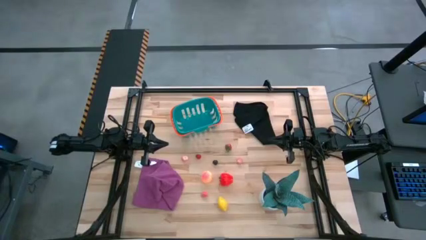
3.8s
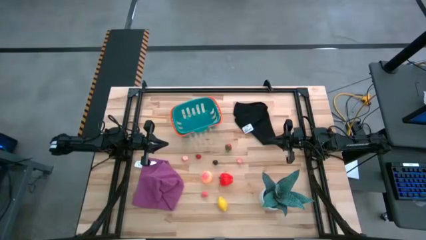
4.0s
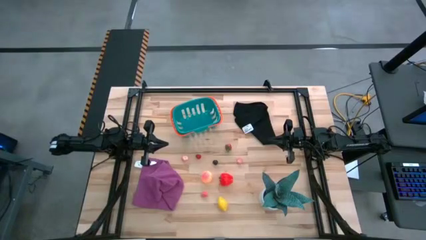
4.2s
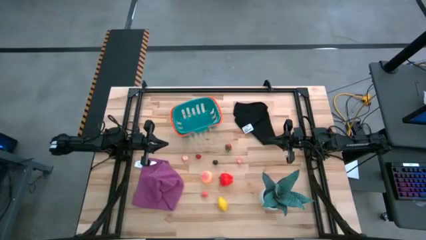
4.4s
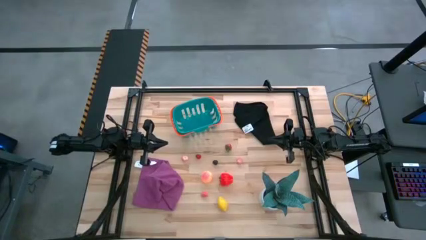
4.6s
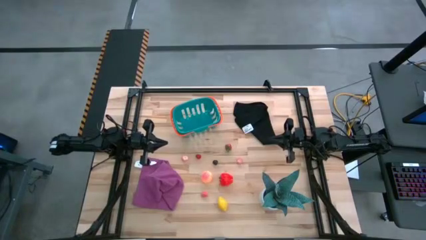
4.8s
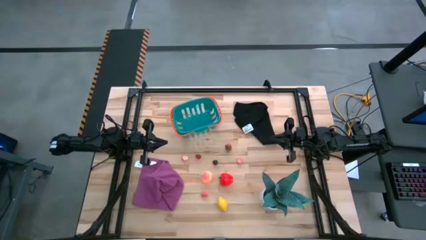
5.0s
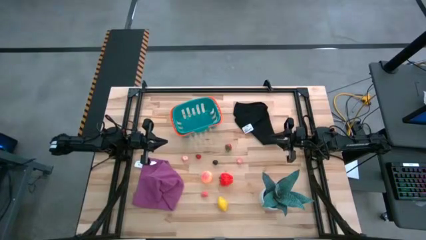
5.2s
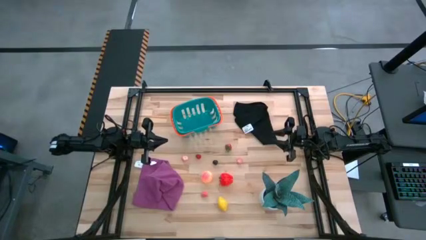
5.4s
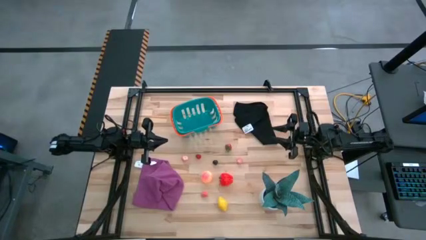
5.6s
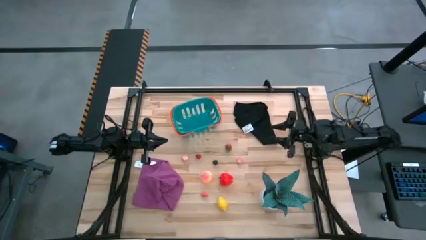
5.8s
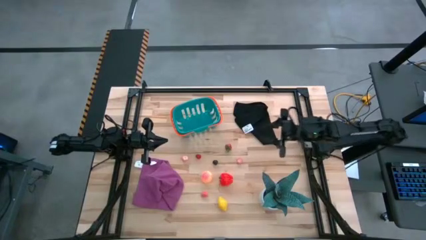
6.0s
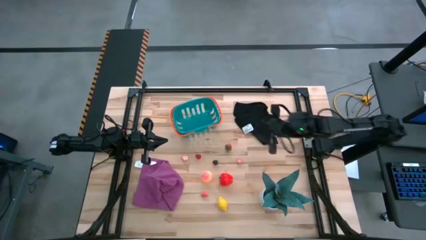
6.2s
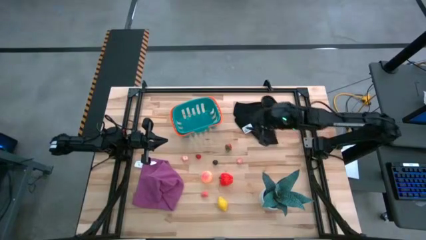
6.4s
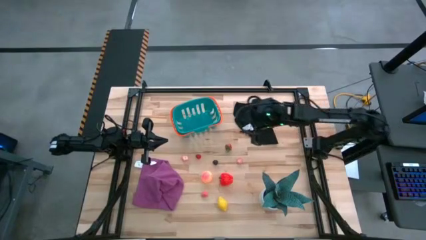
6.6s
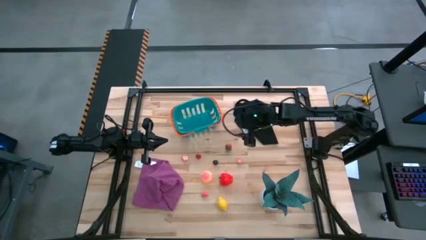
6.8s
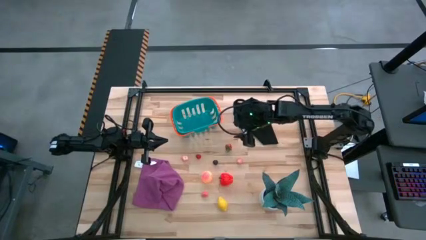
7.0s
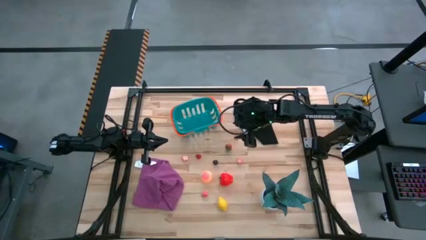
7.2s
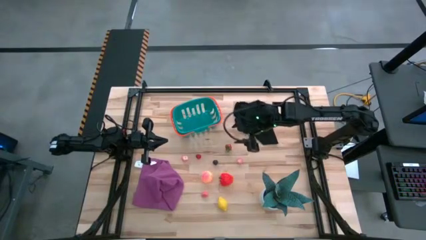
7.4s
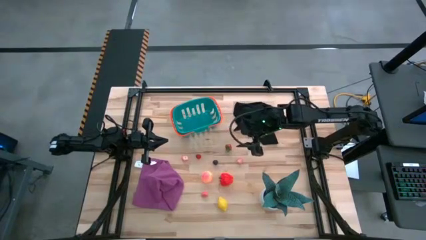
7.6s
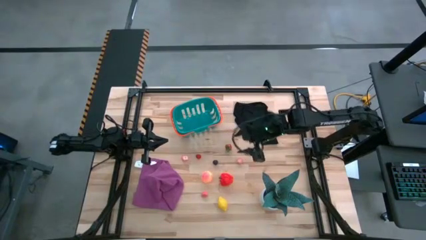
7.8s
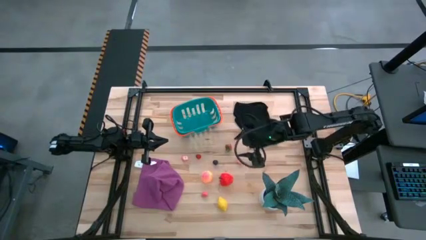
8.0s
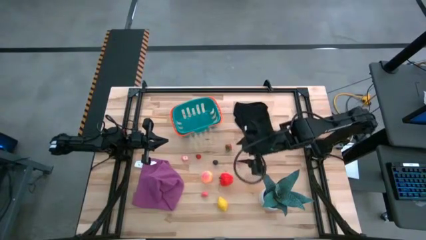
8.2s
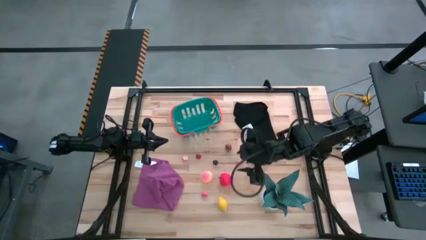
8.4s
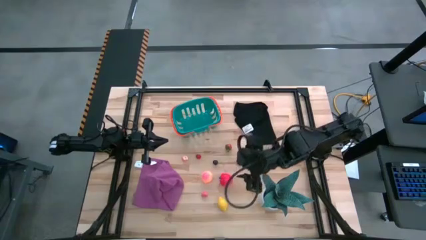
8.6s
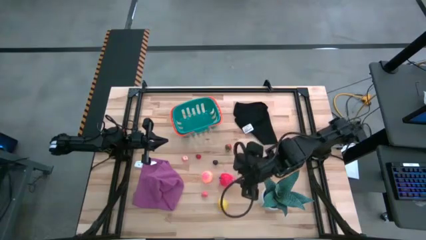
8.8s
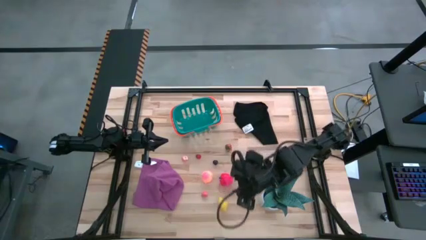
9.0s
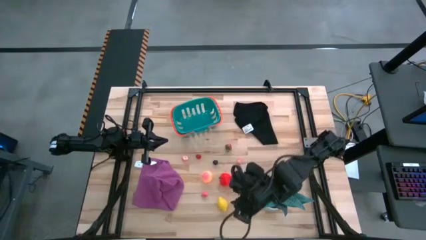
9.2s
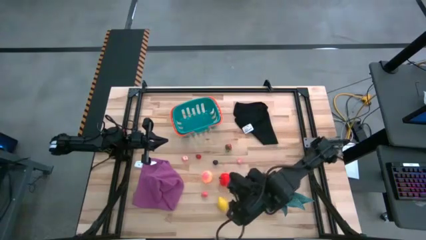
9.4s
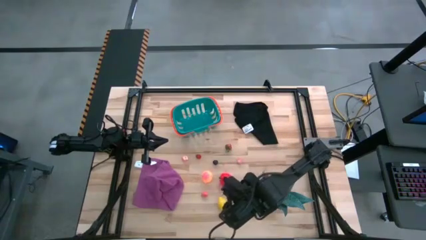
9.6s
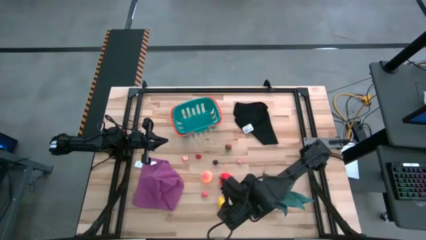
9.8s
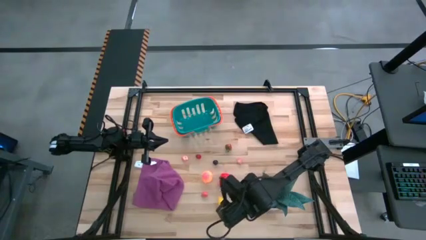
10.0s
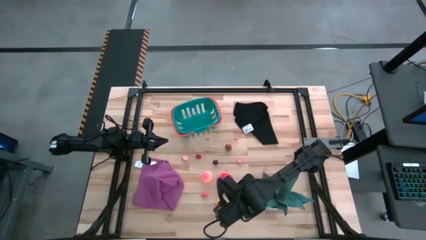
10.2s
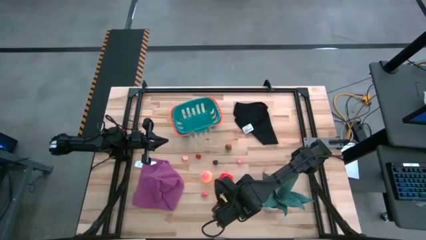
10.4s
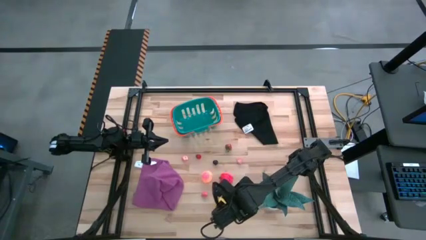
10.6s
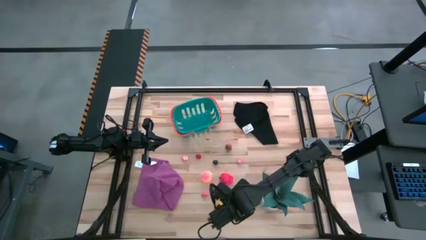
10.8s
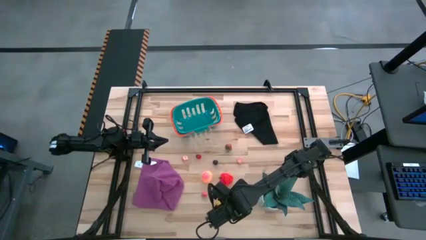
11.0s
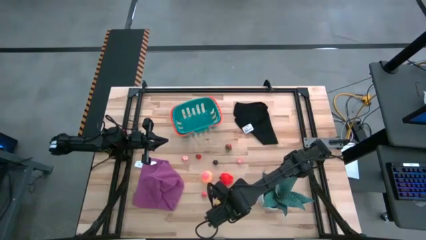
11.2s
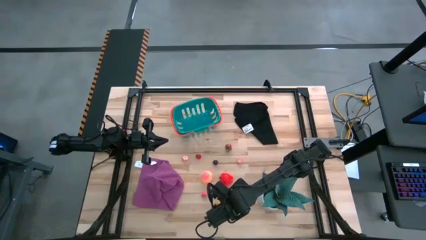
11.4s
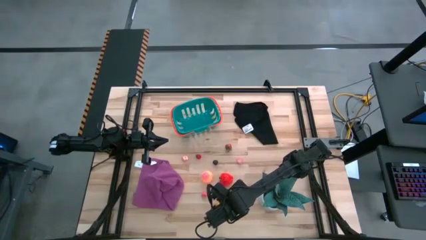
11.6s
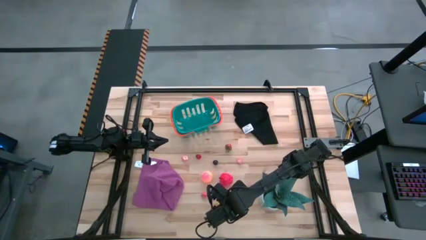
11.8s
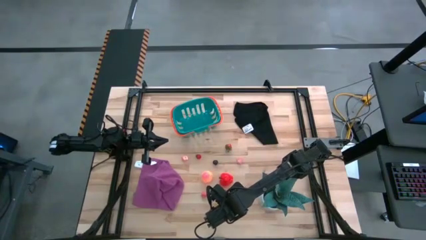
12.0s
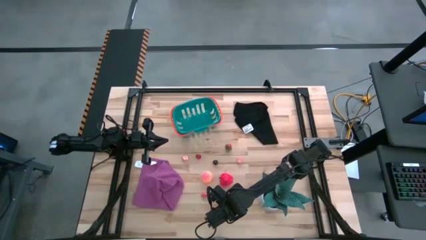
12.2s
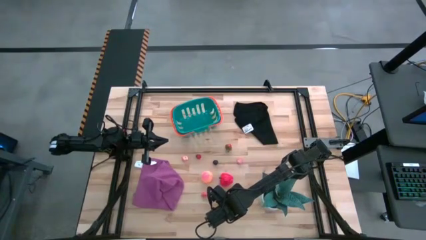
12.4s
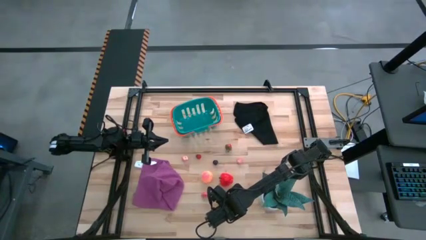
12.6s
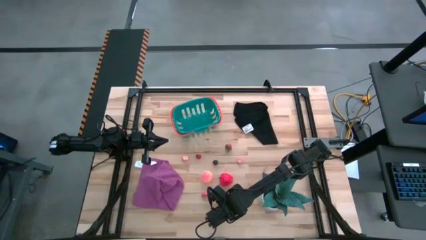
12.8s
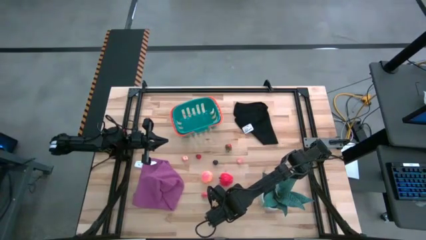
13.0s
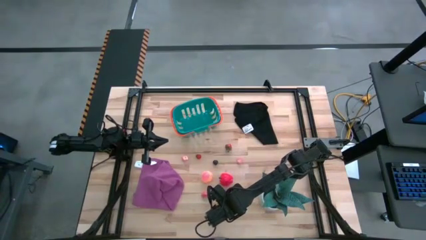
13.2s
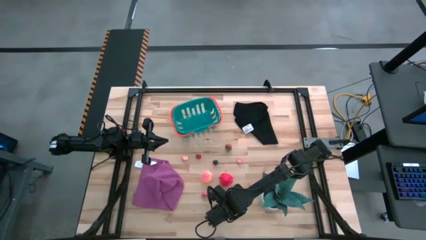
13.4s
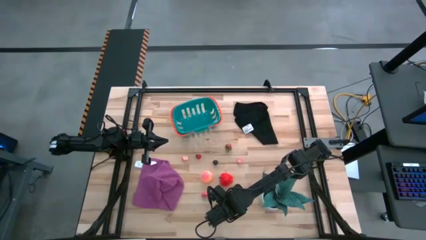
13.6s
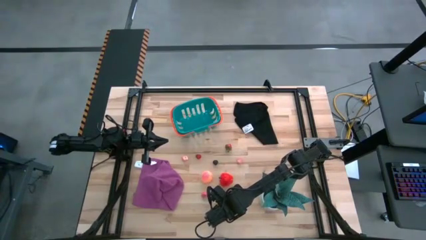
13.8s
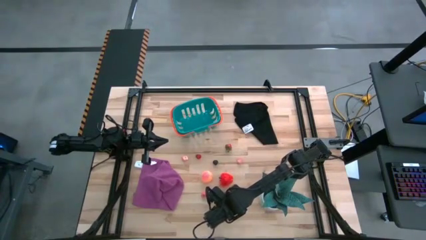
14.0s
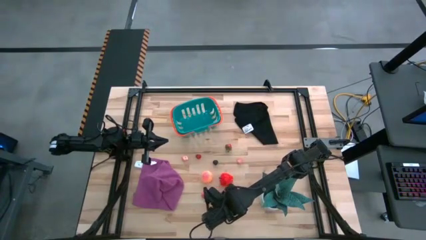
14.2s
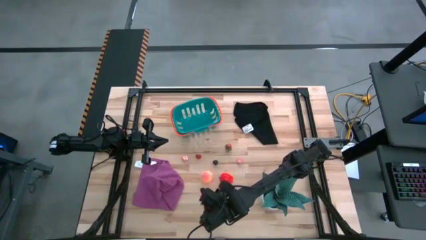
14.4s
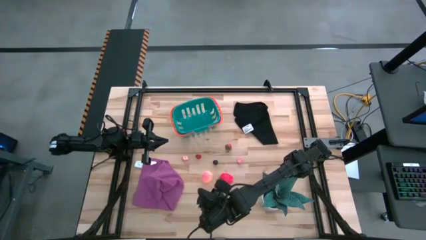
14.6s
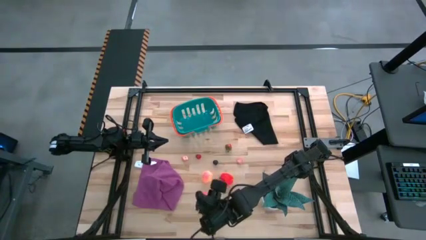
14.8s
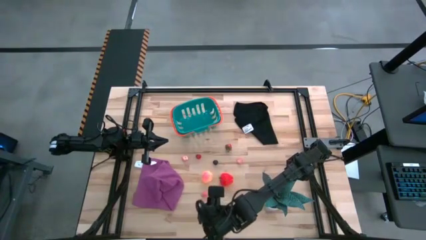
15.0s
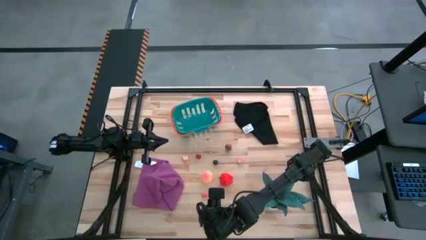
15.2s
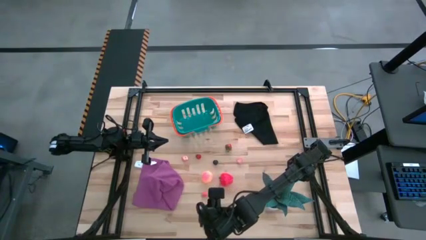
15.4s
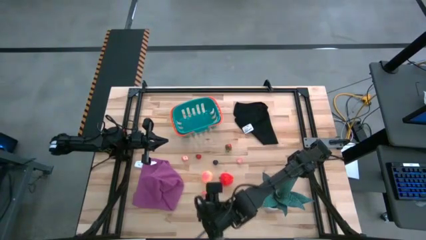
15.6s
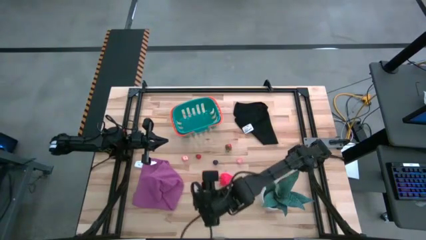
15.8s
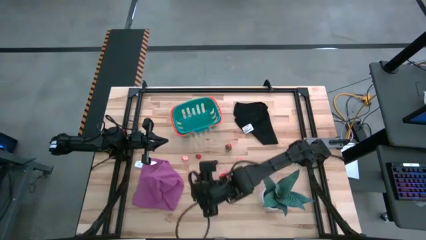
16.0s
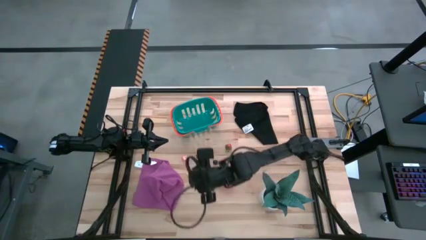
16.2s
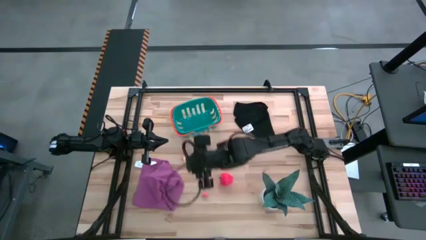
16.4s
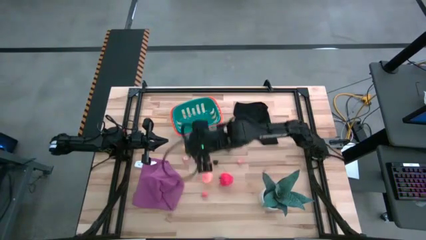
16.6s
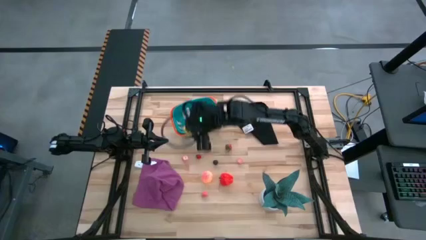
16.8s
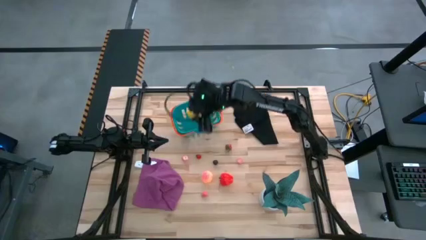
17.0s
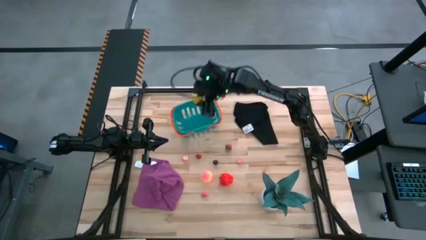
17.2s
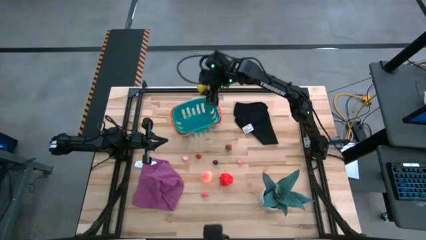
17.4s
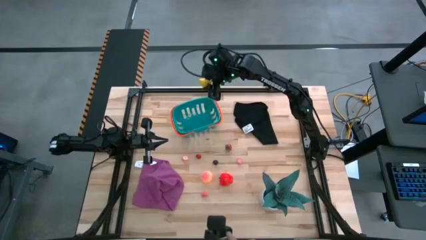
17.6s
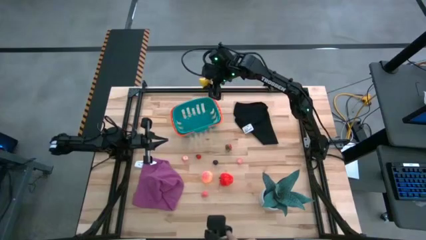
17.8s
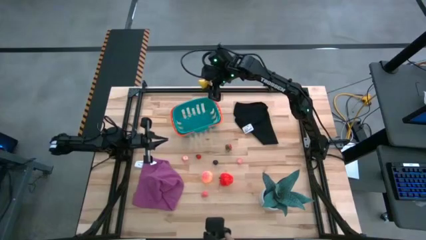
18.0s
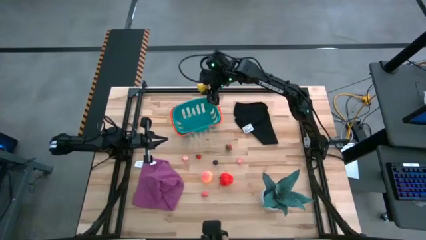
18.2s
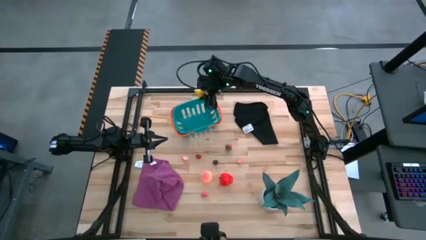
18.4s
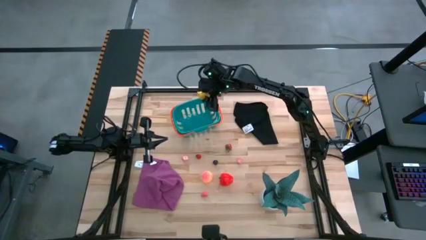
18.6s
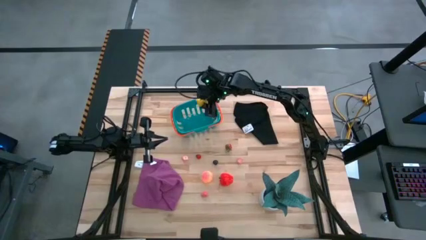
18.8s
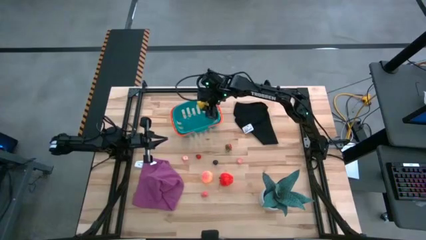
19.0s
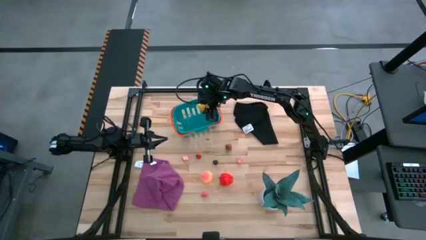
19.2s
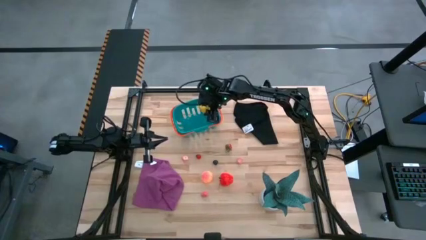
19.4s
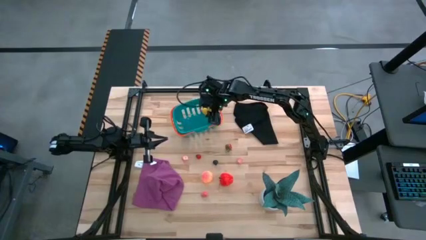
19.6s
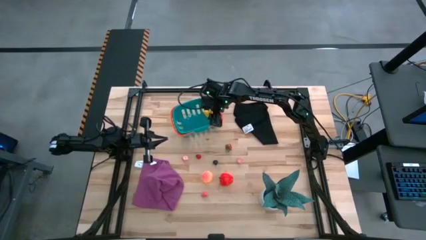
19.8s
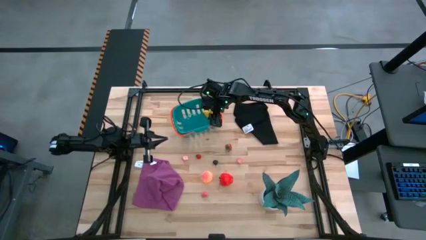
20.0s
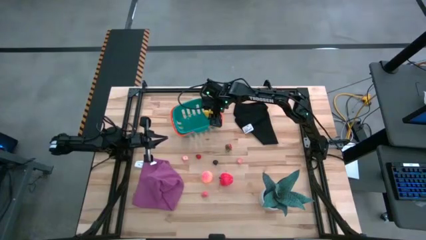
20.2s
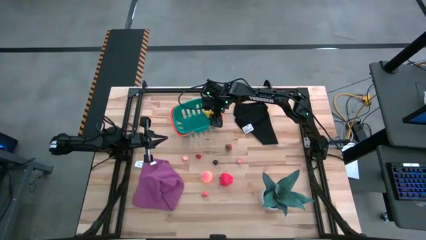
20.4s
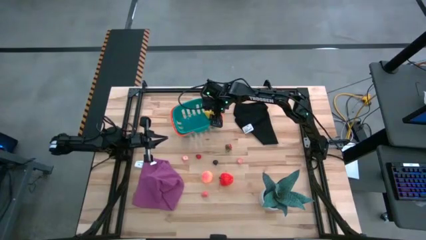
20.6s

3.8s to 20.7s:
Task: Pick and placing Produce into tupperware
Put the yellow lemon into the basket
